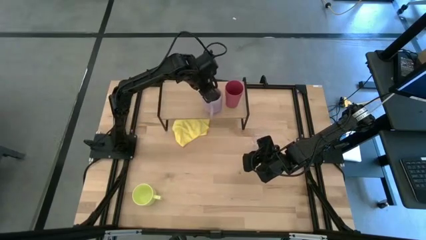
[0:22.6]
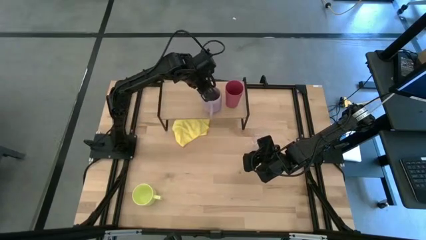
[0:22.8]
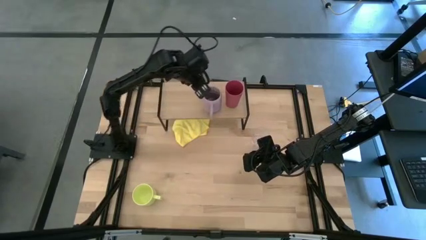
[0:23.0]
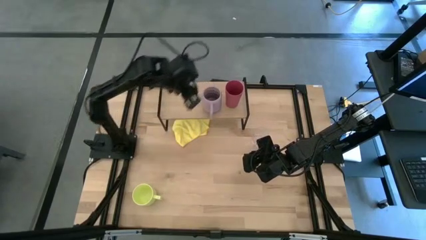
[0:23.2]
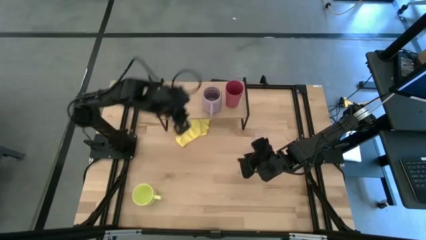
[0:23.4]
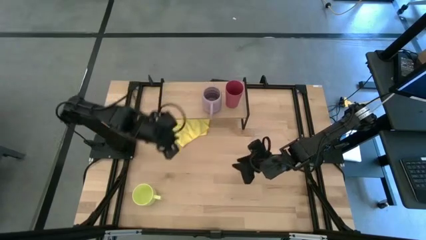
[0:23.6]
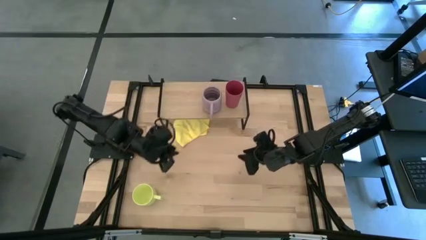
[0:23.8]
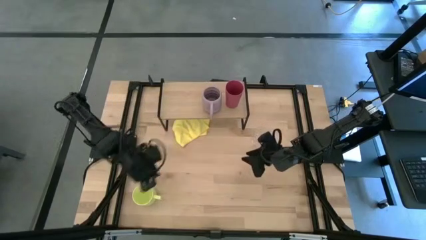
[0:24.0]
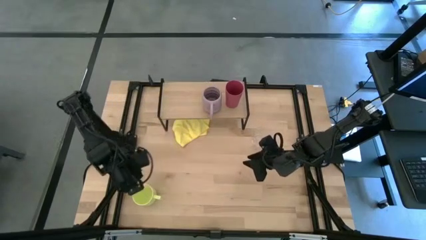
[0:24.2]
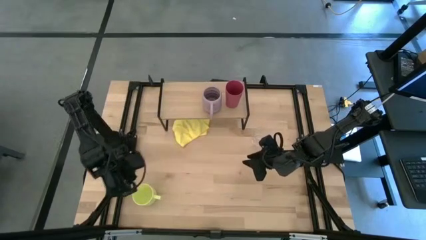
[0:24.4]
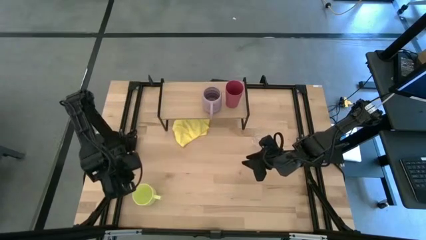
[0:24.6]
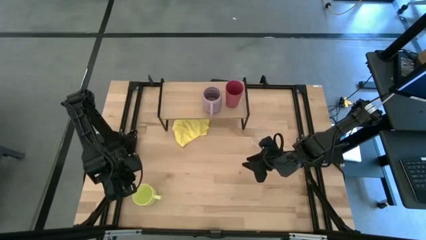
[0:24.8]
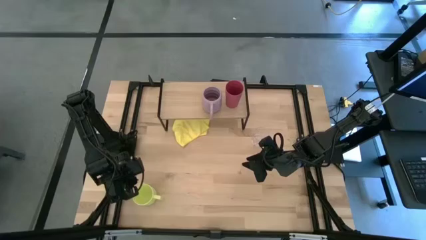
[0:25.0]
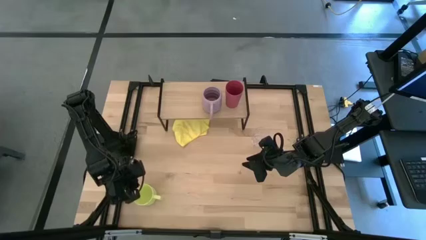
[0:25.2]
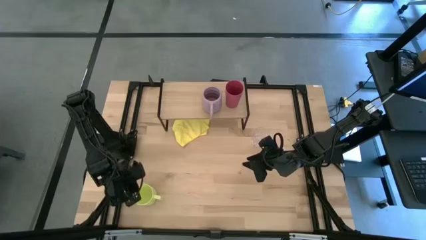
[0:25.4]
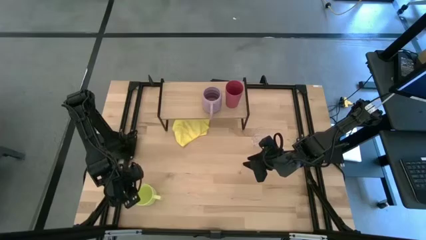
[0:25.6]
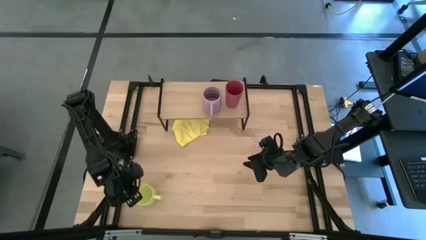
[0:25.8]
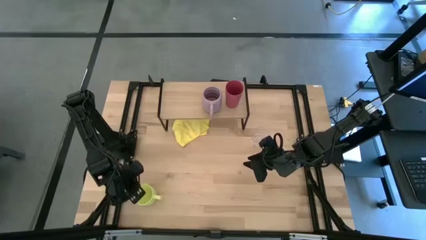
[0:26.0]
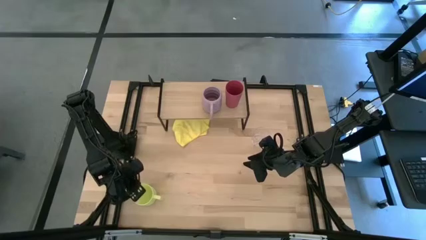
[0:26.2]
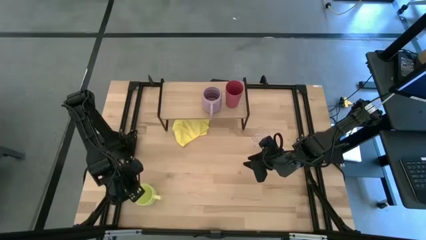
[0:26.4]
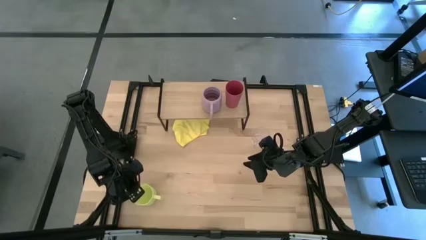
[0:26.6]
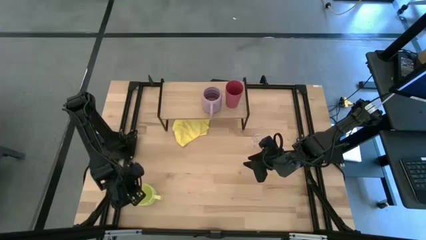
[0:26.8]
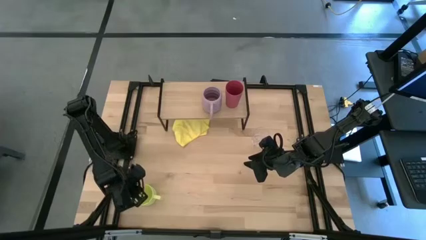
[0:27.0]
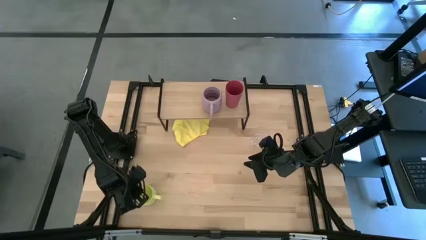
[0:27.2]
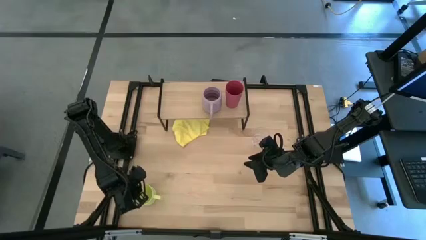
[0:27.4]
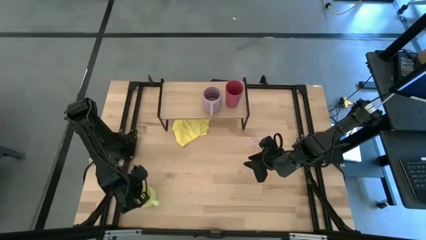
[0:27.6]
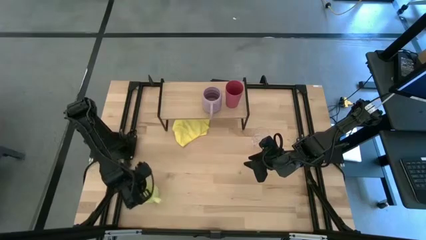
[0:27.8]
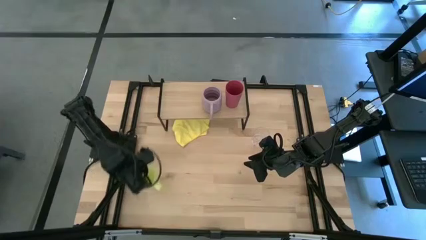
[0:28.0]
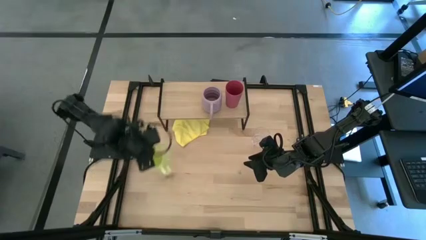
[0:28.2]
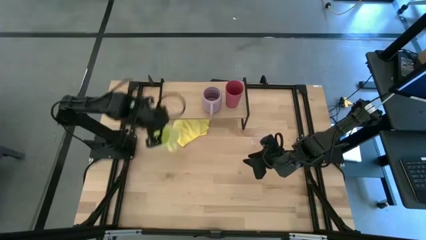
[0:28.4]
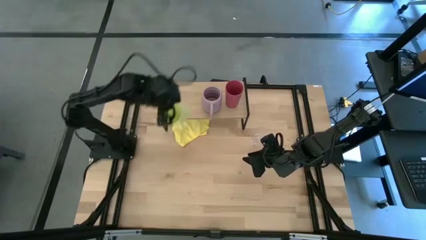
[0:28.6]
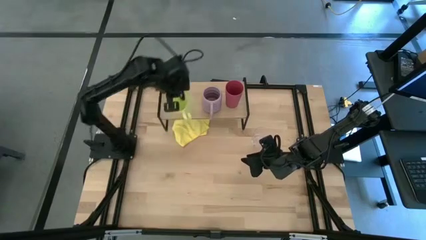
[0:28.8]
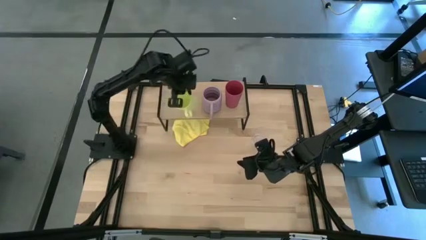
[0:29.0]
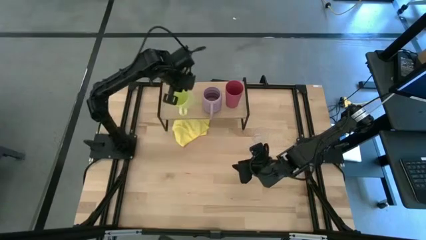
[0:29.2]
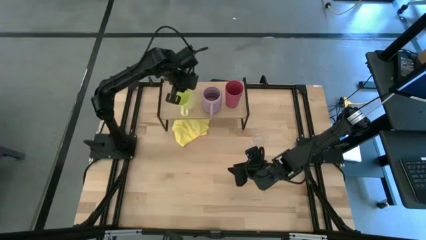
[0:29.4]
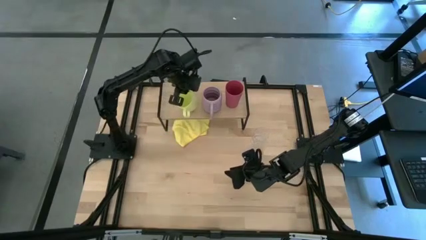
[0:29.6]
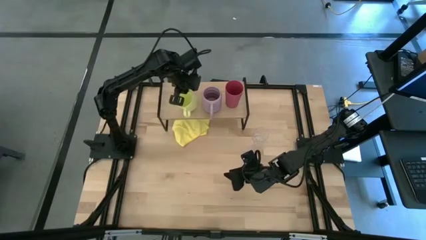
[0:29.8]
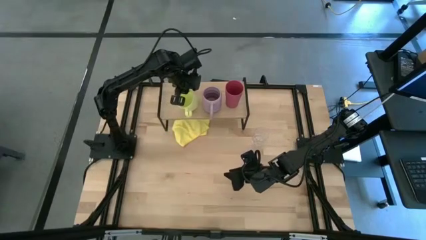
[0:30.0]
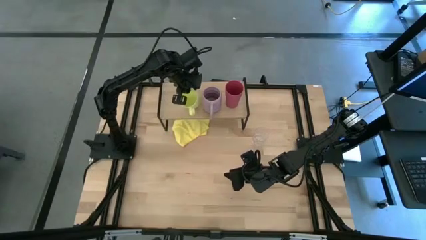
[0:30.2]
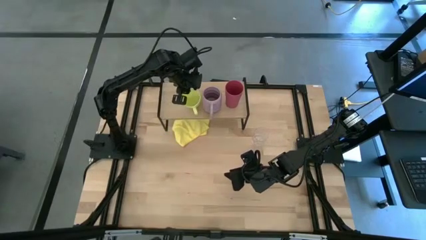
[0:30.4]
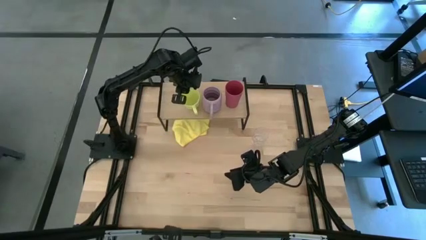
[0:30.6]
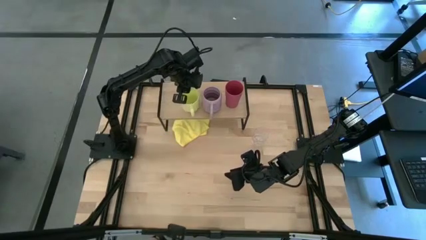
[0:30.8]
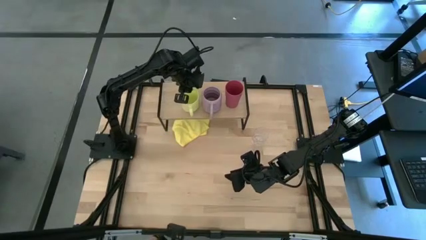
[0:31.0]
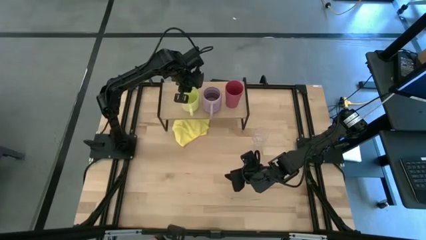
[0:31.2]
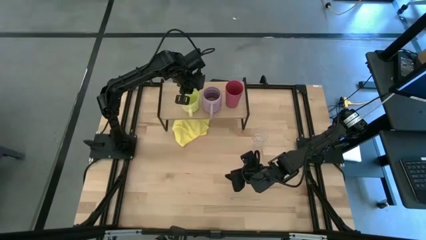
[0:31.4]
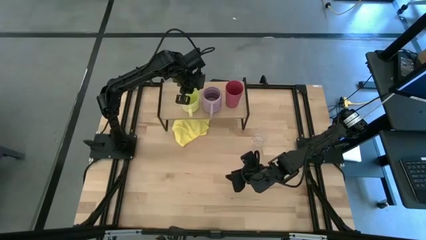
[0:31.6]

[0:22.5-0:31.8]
Task: Stack small to large cups/mugs on shelf
Put the yellow mug on the shelf

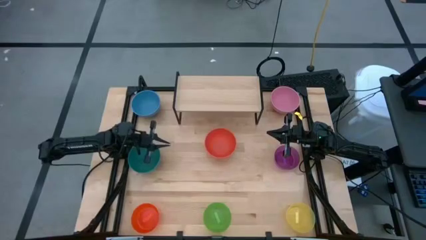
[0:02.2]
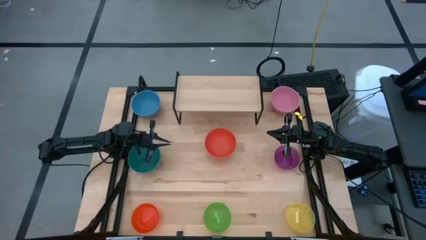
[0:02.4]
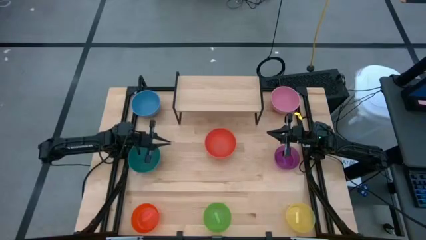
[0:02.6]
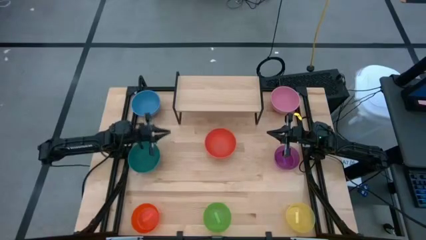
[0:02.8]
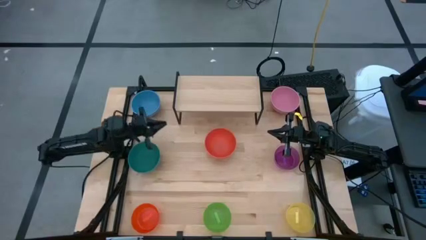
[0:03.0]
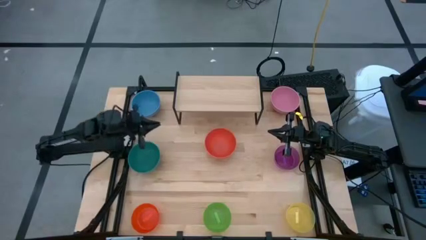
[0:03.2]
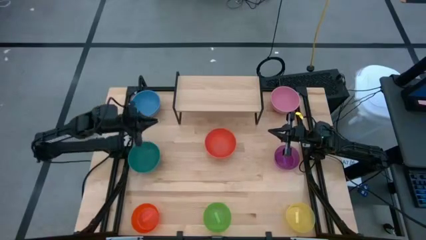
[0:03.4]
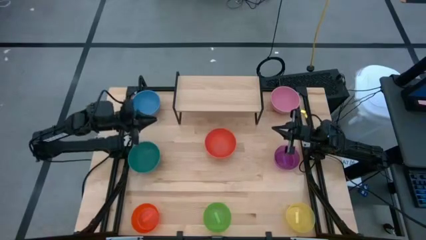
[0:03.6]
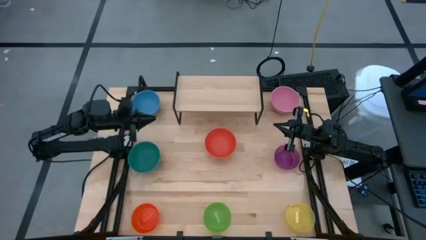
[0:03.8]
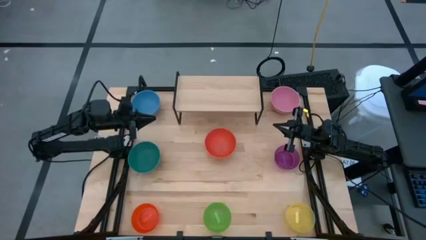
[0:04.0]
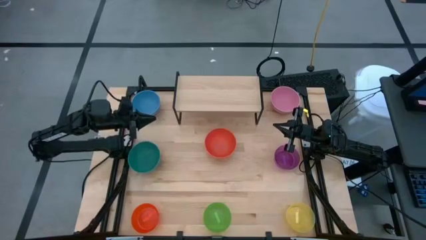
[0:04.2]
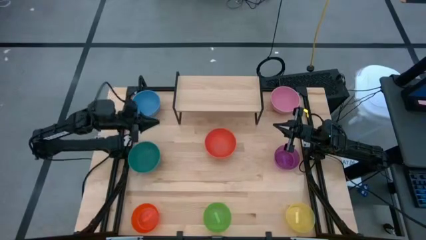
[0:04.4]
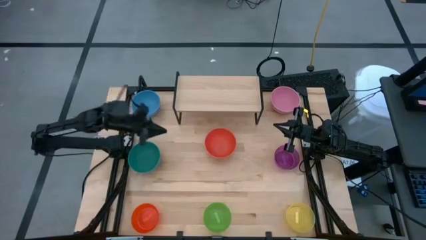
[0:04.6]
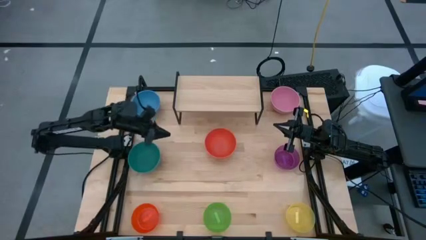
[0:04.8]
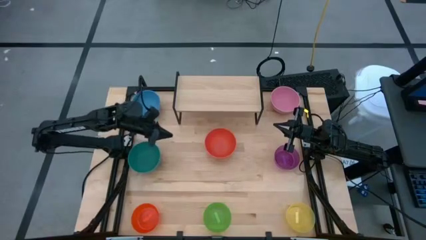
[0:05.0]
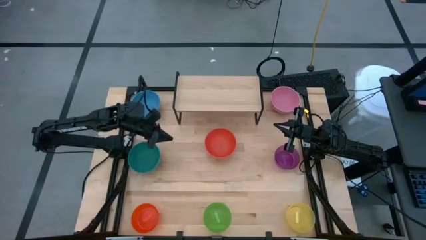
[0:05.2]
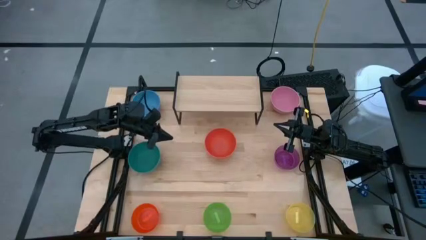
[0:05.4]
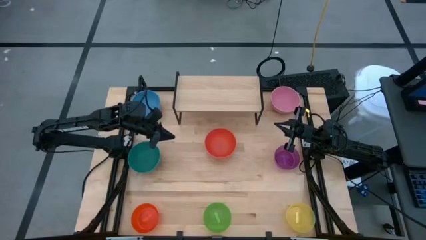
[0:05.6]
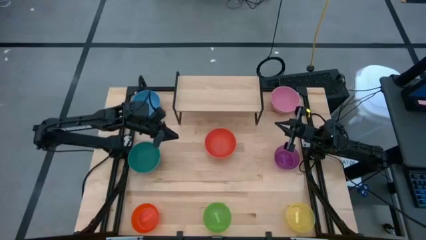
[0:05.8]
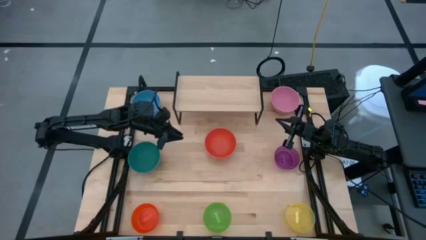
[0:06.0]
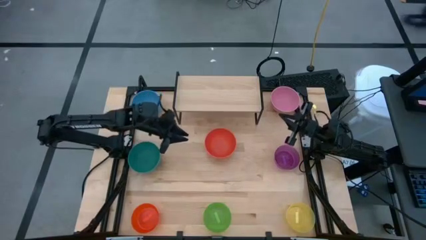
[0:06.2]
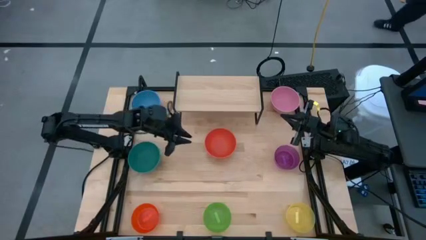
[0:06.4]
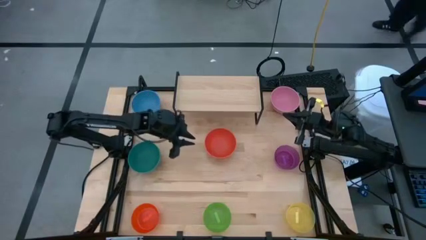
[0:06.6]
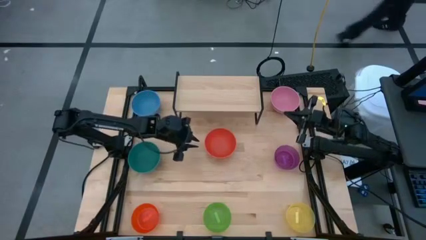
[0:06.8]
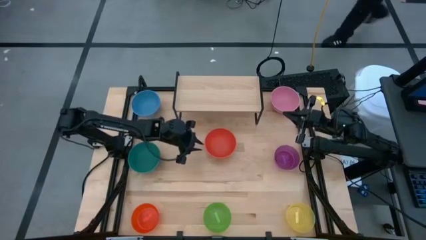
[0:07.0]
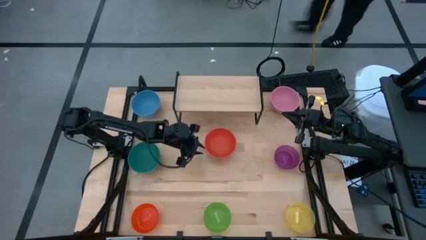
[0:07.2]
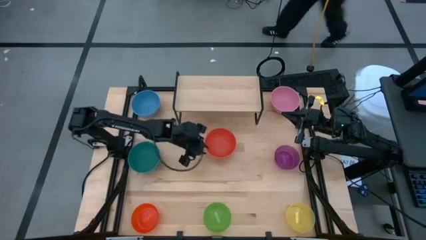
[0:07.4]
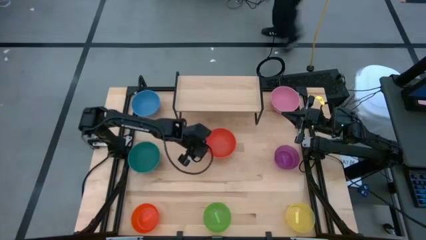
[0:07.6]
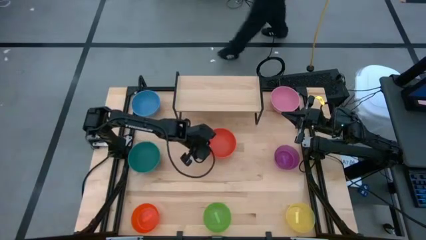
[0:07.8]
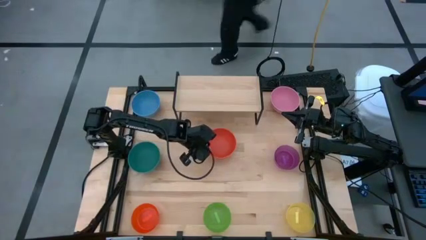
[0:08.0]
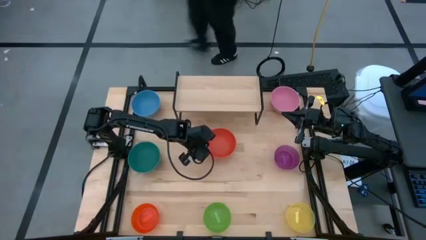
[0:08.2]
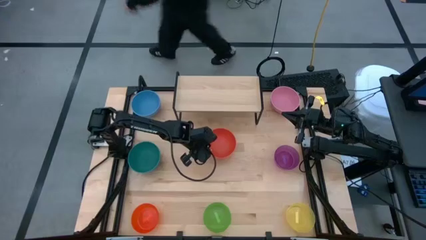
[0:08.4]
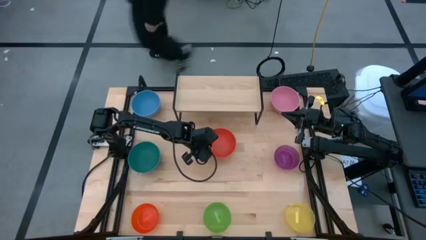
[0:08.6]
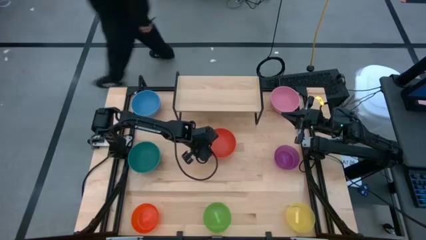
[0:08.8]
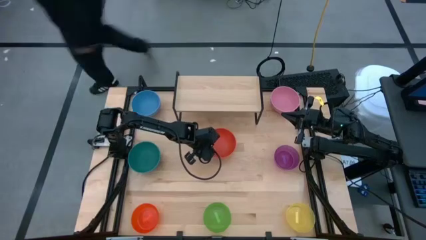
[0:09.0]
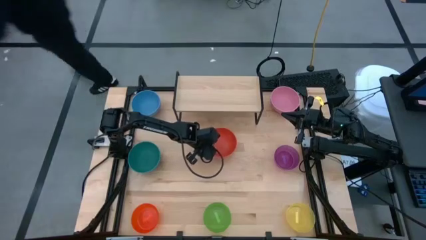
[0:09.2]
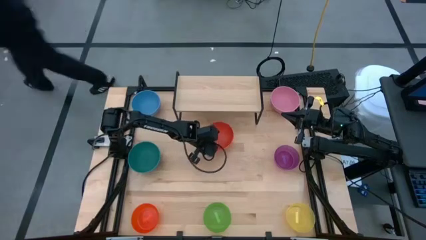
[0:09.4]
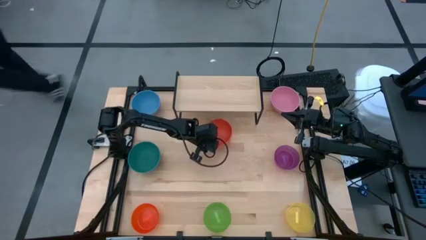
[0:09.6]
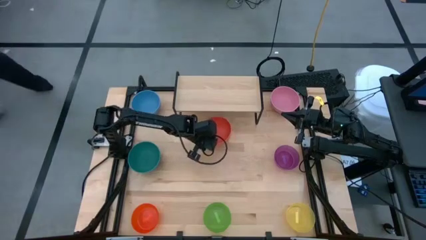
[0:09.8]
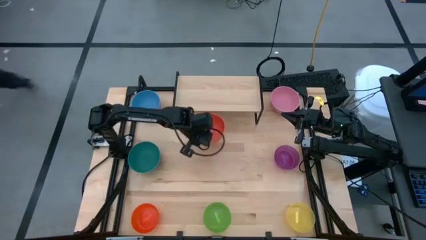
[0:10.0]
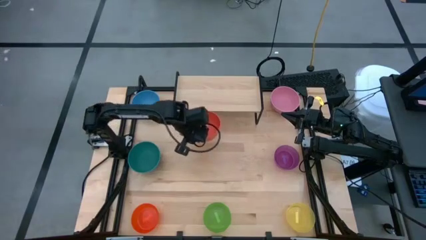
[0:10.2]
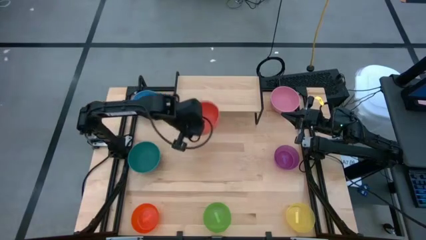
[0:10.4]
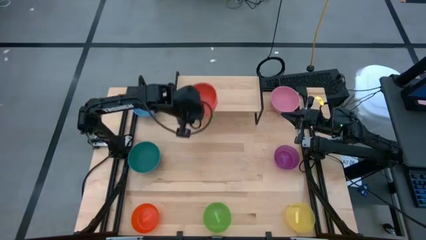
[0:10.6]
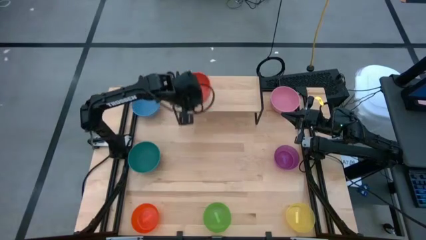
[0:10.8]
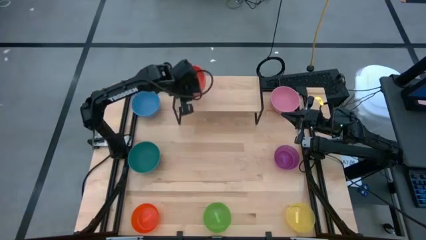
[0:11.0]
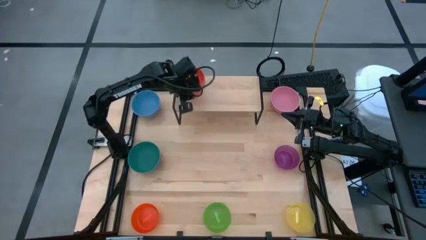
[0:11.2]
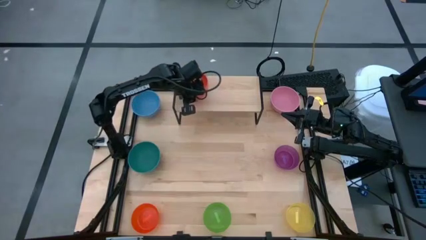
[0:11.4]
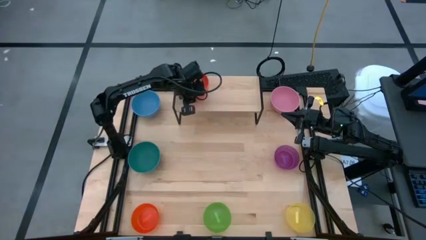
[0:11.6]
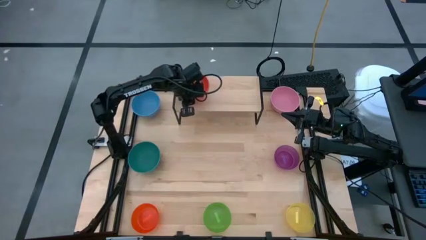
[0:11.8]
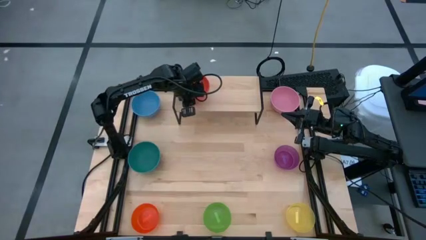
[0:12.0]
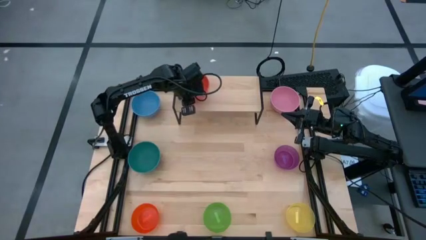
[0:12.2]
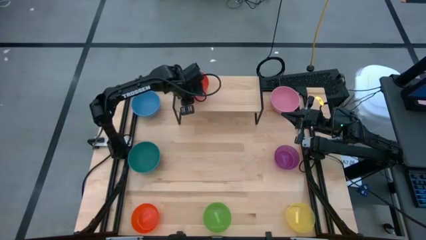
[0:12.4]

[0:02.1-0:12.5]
Task: Place and stack bowls onto a shelf
Put the top orange bowl on the shelf
